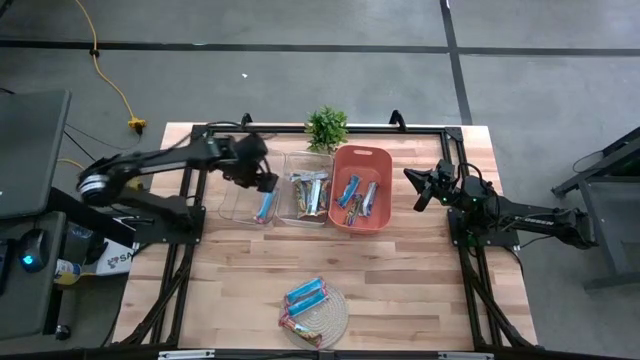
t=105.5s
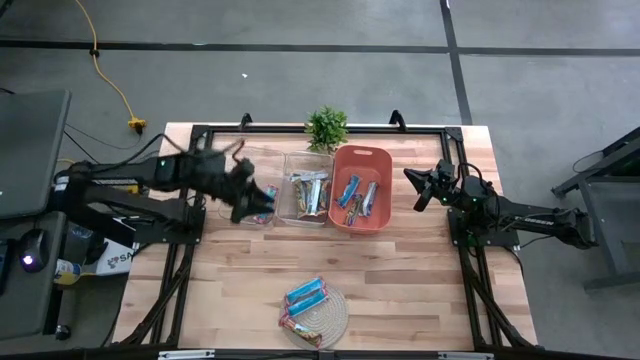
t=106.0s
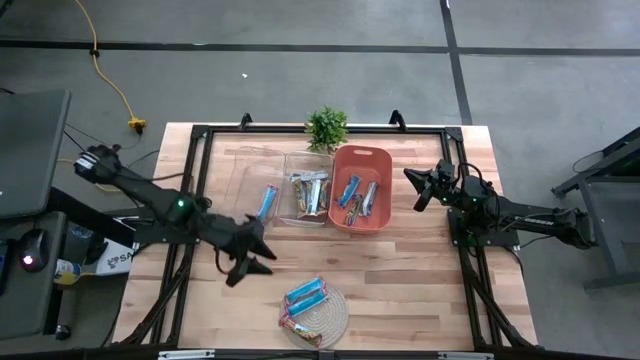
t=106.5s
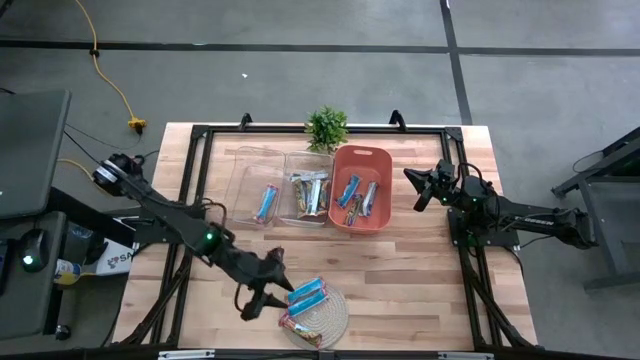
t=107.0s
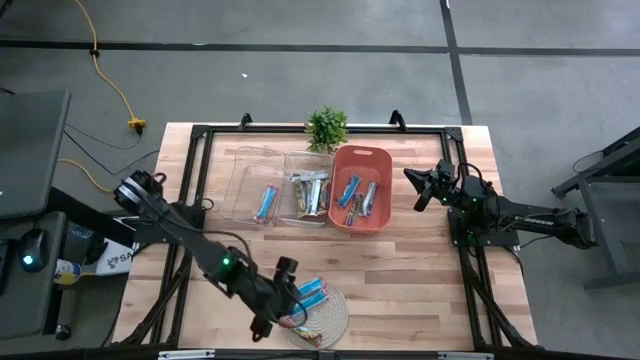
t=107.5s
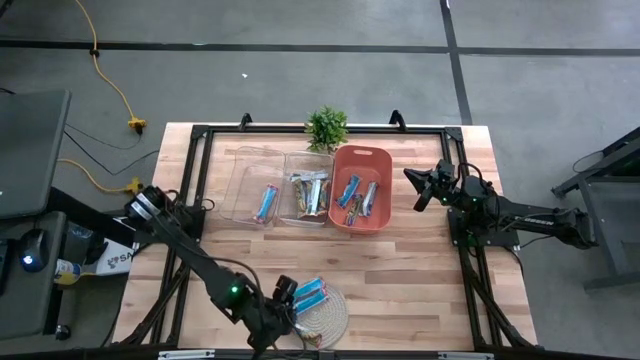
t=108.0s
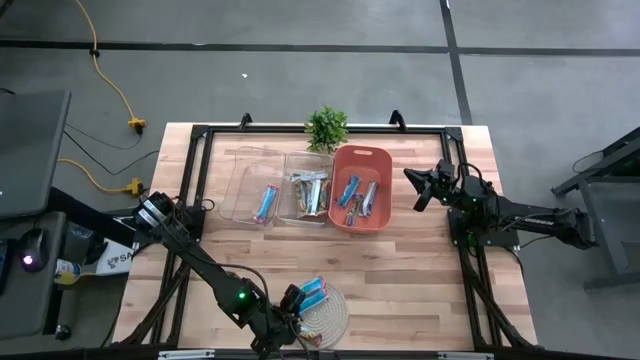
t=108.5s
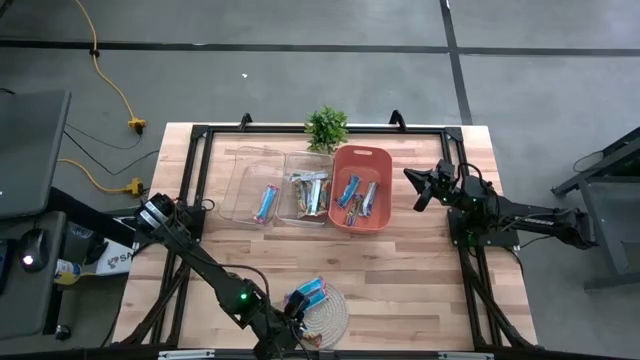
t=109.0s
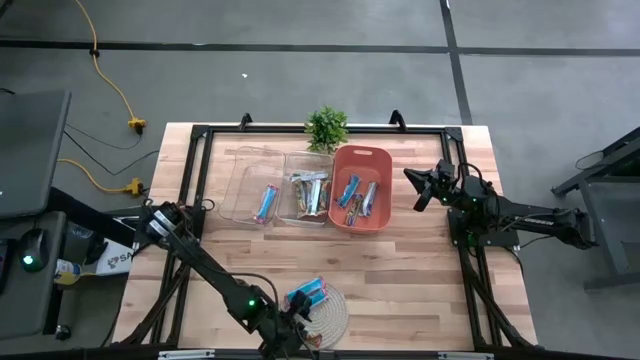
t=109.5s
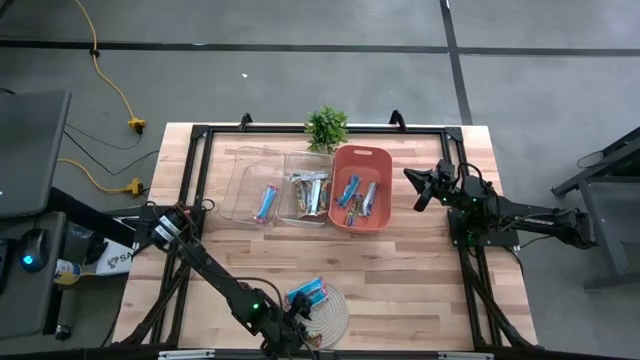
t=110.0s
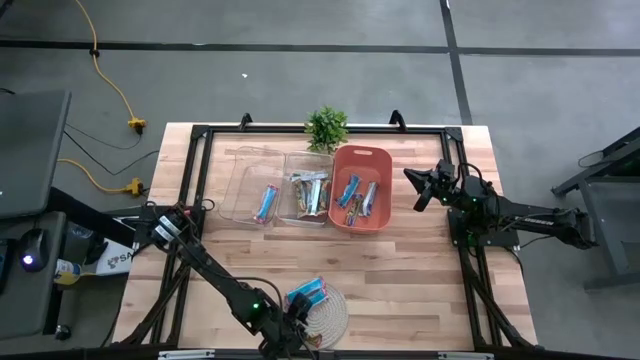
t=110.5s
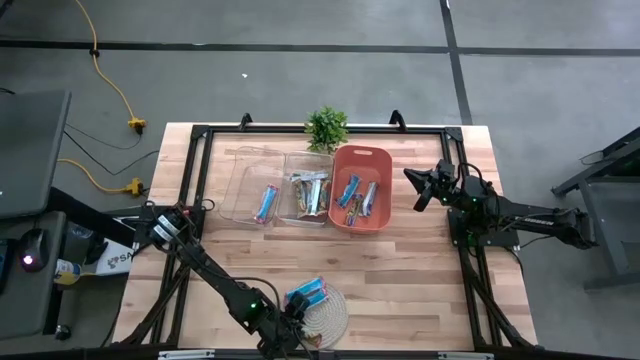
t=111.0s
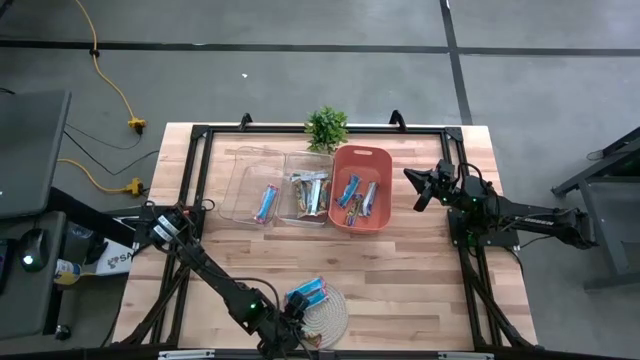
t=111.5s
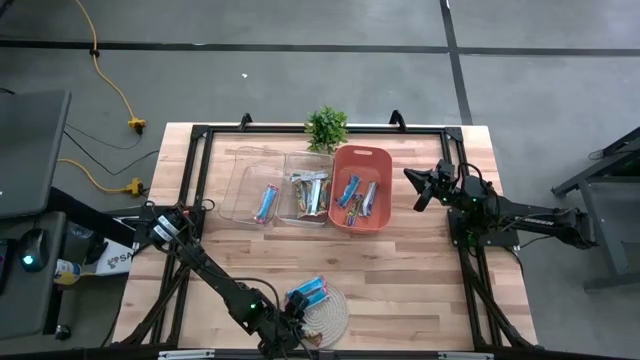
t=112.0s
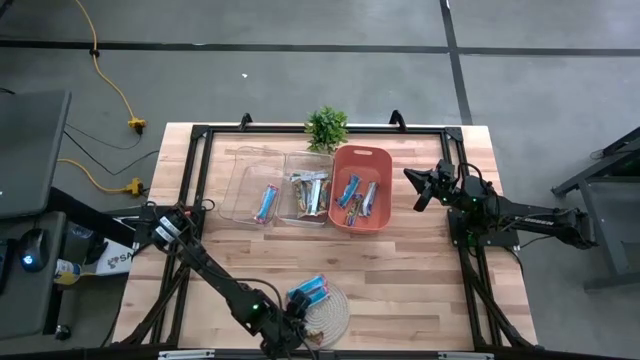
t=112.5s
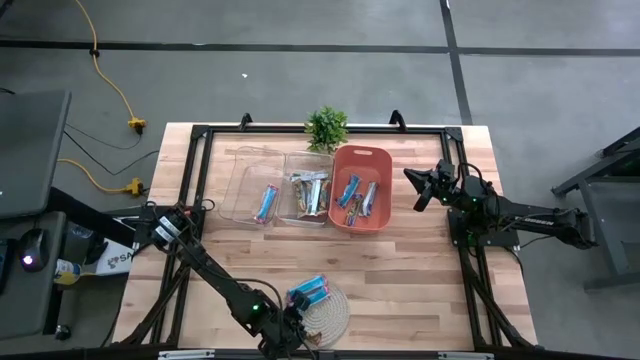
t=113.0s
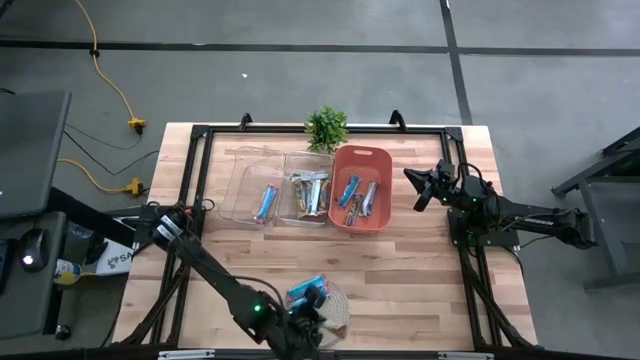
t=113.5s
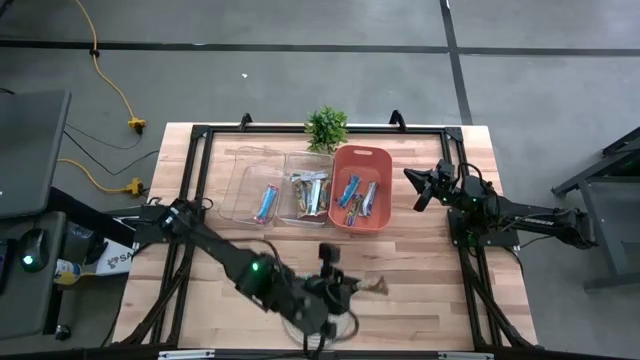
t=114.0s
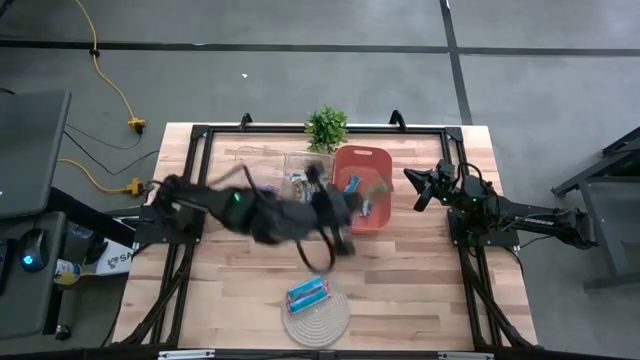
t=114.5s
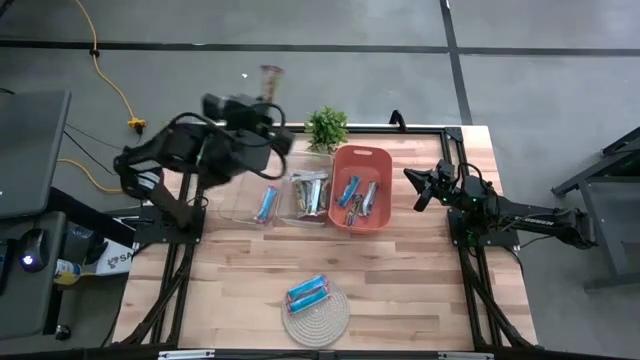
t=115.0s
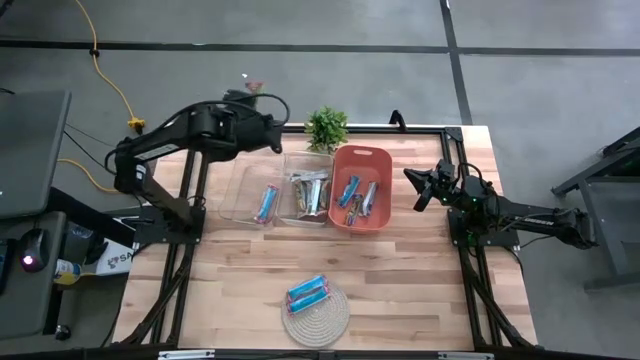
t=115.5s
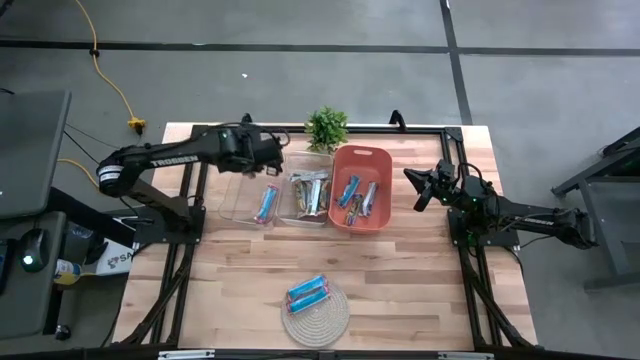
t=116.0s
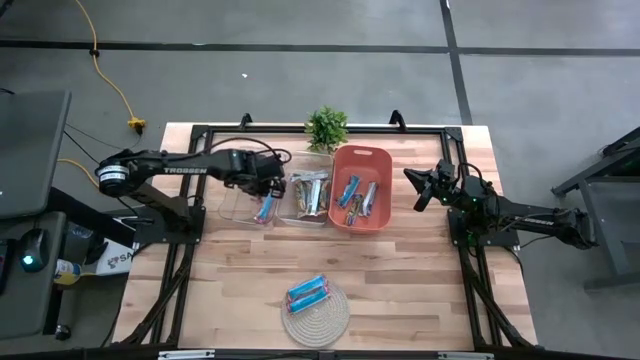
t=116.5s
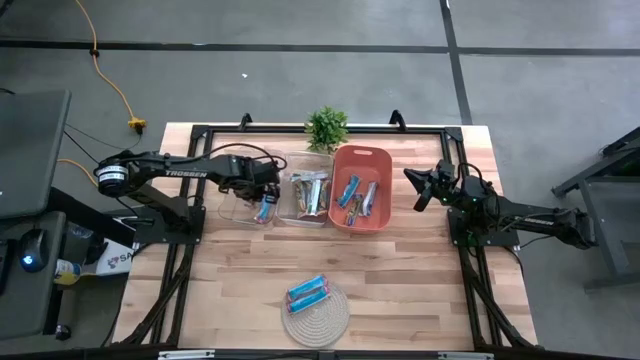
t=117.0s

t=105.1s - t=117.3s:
Task: Pick and place Granola Bars by type
Put the bottom red granola bar into the left transparent bin

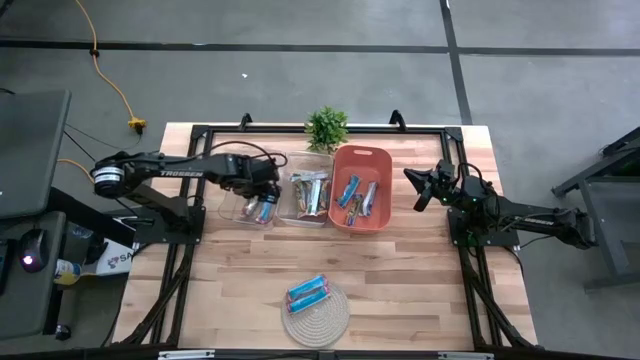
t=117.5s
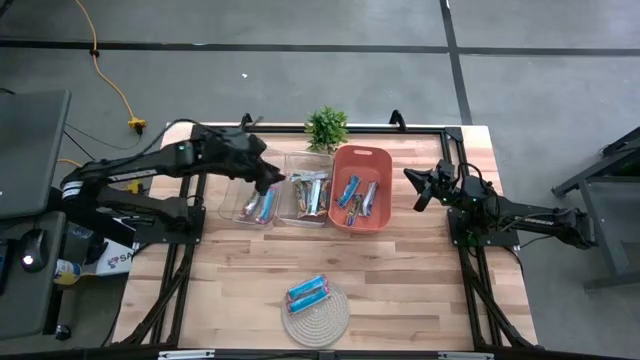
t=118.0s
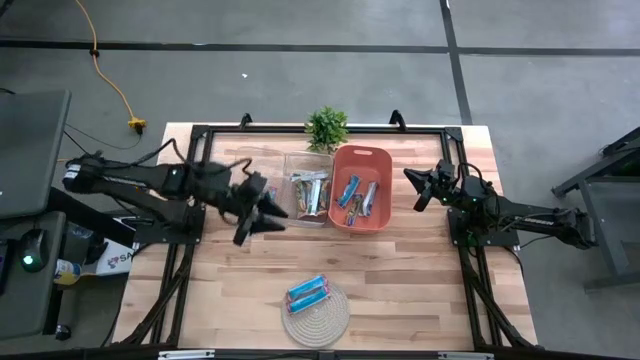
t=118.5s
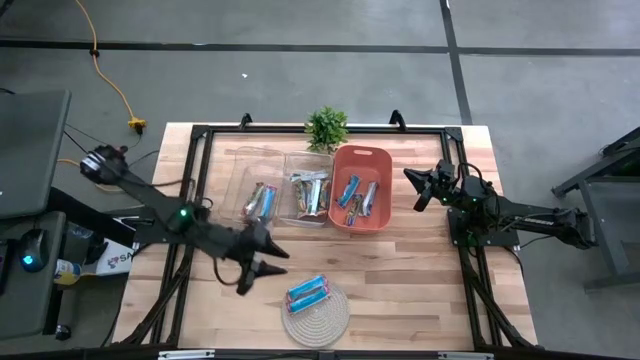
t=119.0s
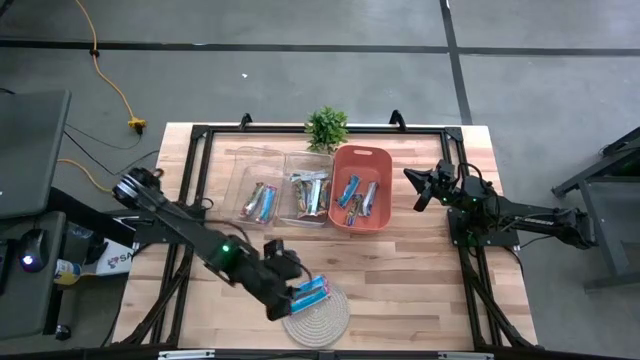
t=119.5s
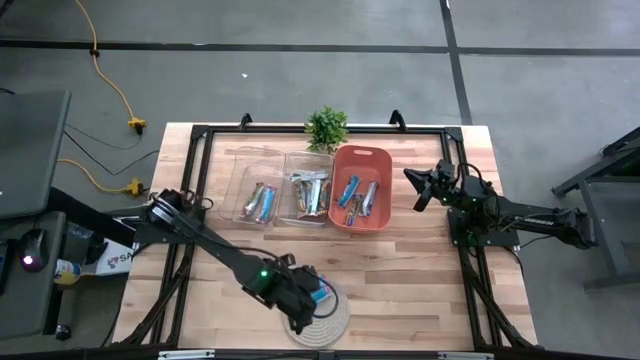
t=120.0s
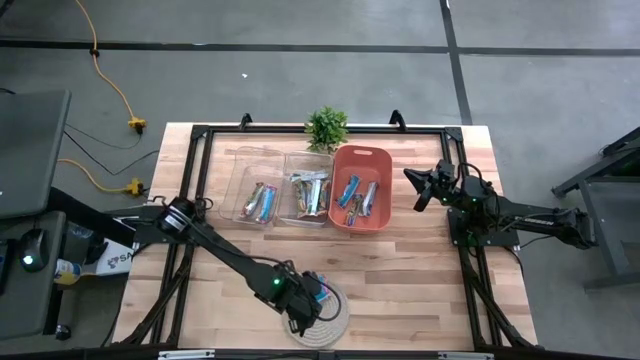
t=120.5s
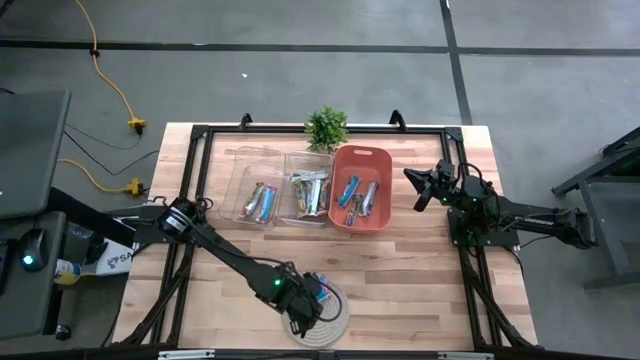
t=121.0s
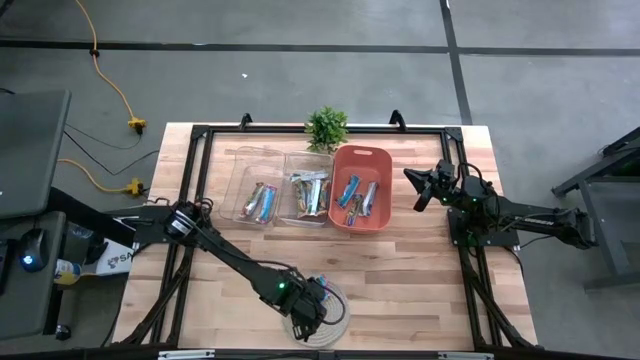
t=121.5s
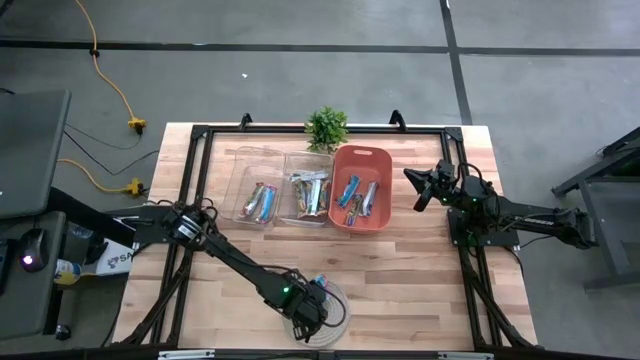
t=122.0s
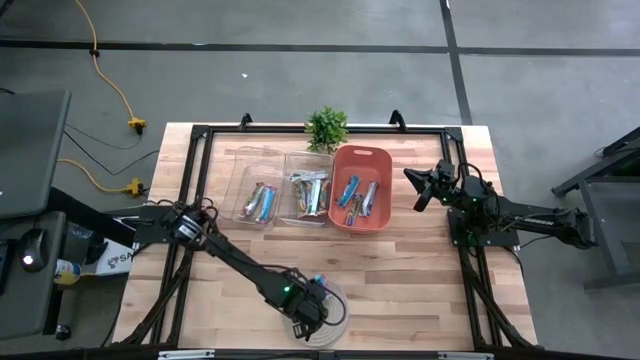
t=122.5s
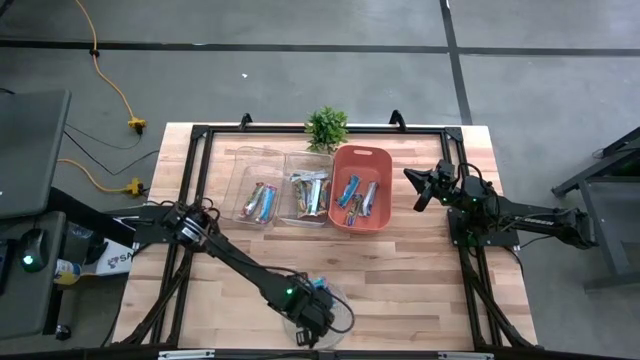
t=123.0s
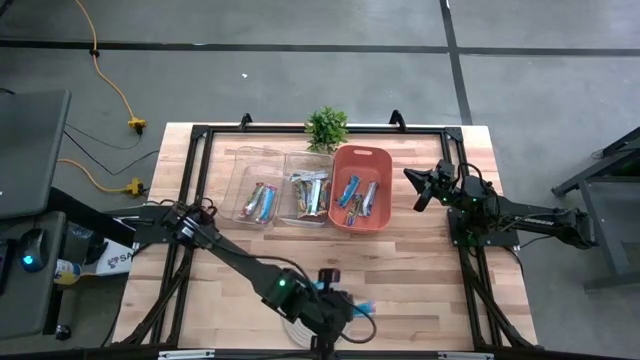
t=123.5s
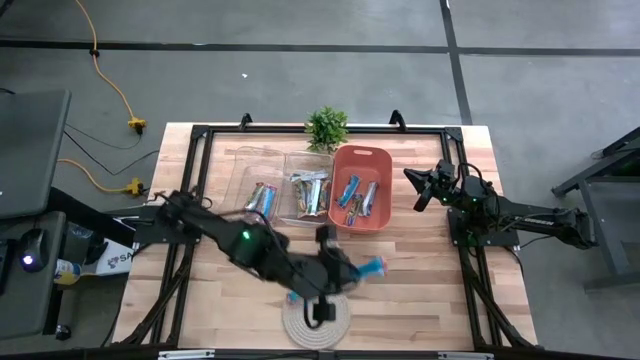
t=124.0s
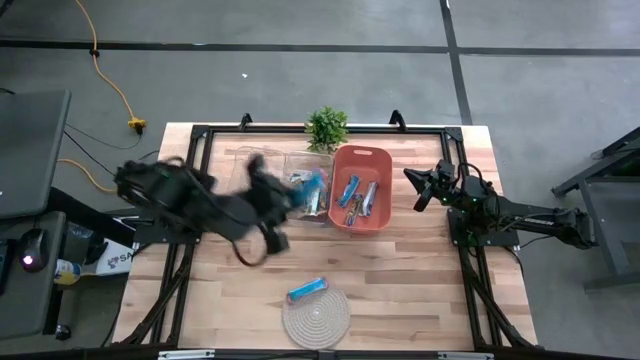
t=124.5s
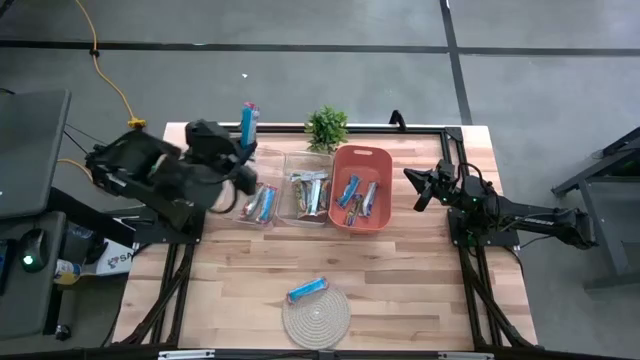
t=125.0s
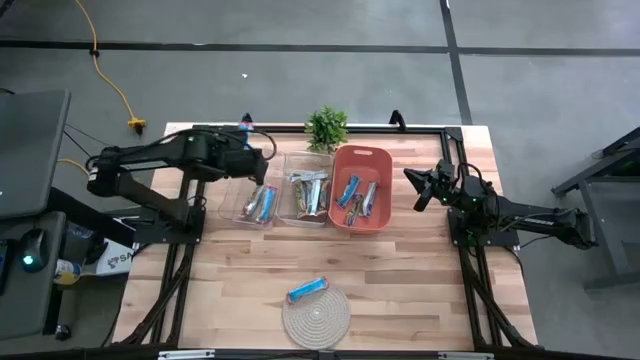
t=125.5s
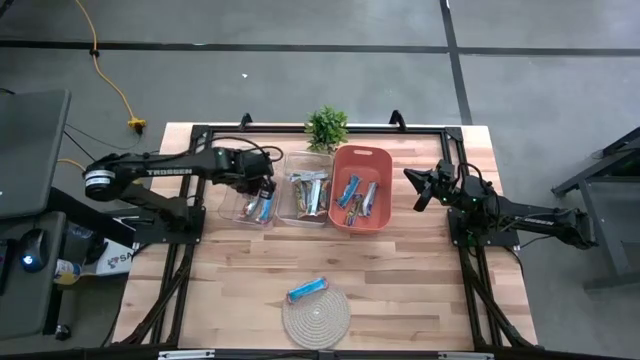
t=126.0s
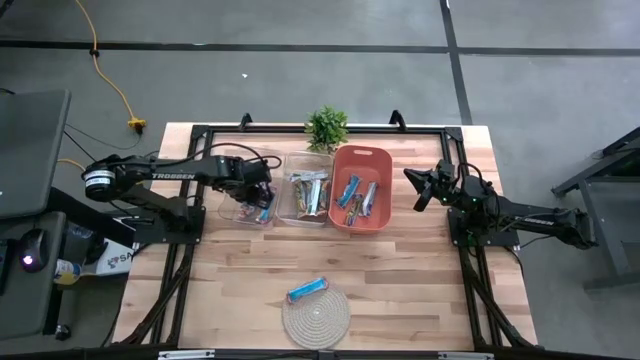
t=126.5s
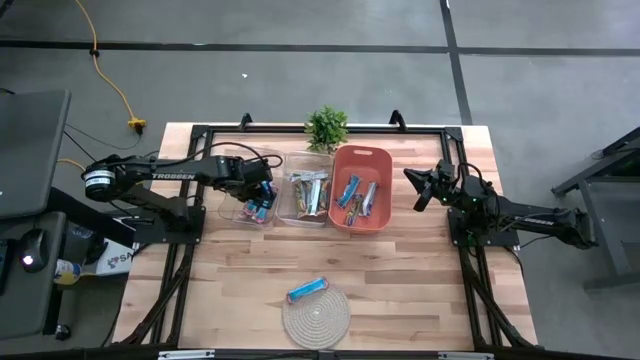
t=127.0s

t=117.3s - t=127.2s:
Put the bottom red granola bar into the left transparent bin
